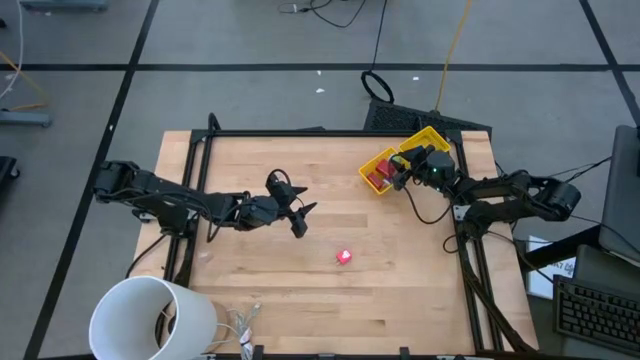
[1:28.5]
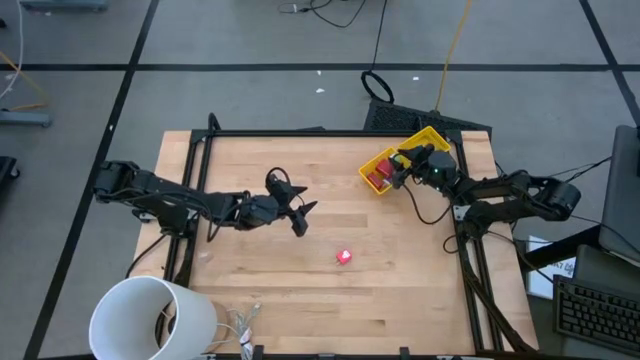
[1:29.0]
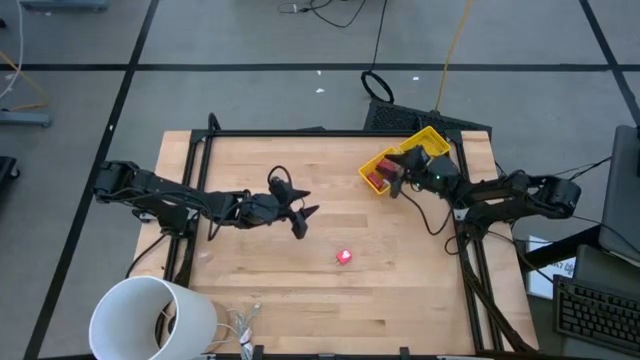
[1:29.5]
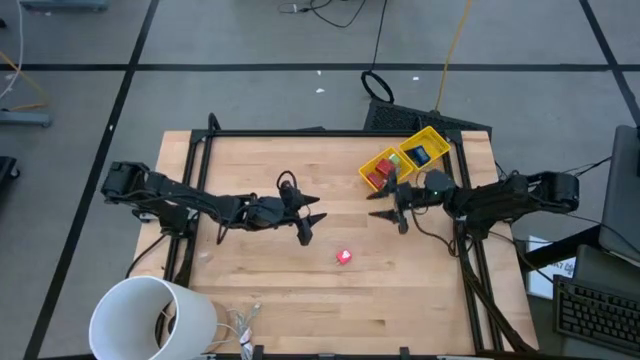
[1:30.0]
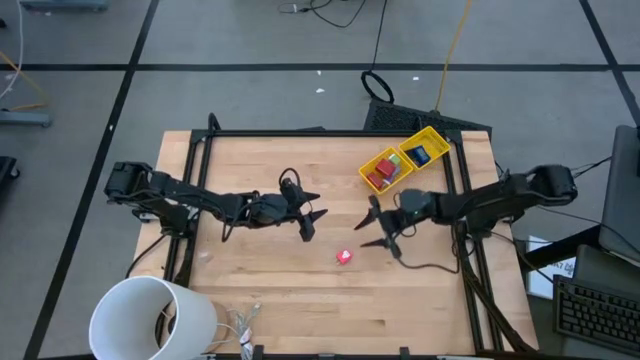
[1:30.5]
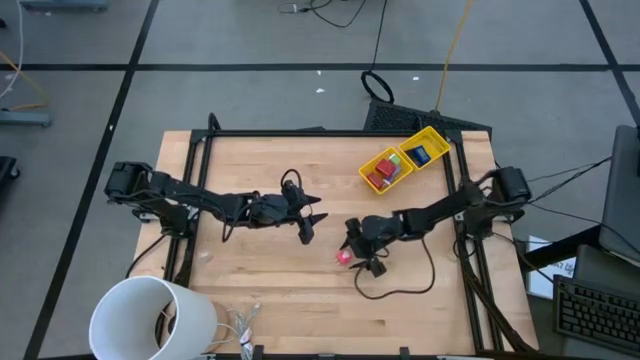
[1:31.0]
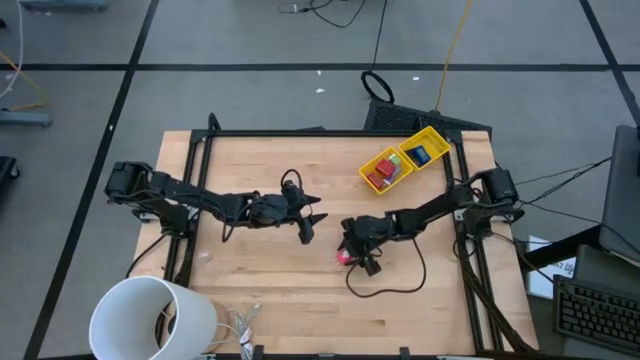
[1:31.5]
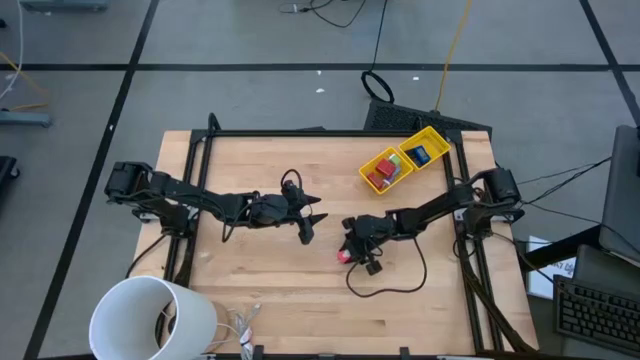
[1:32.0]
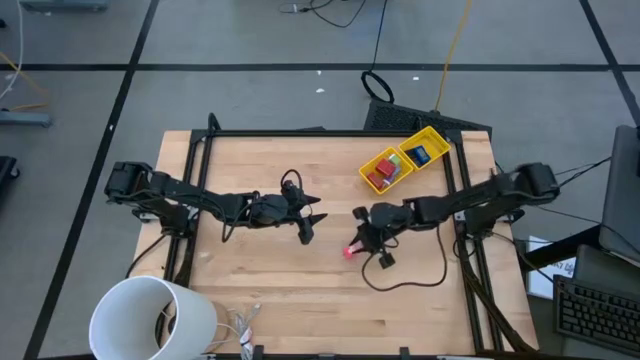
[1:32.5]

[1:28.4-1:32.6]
Task: Pick & Place Office items
Put the pink charger adapter into the left yellow bin

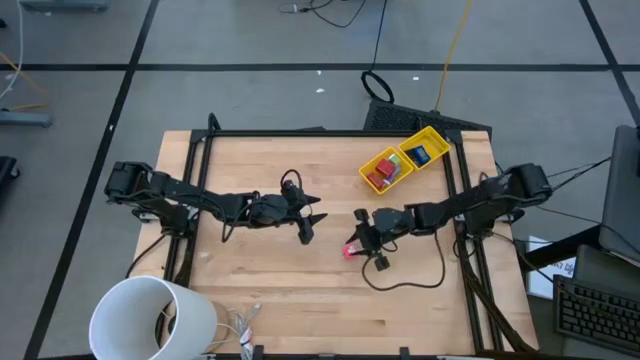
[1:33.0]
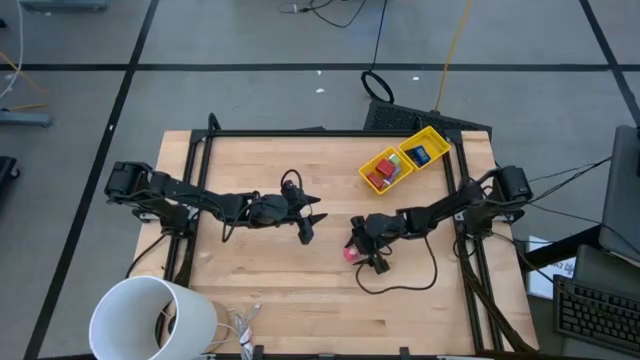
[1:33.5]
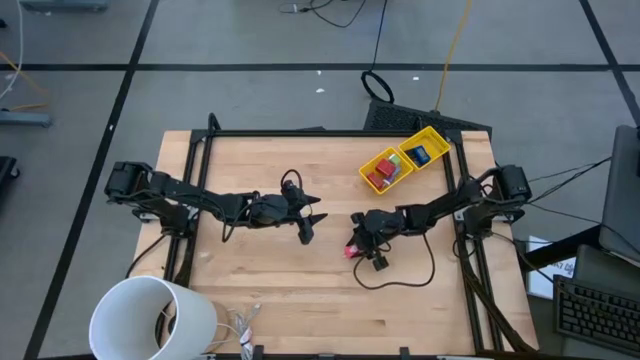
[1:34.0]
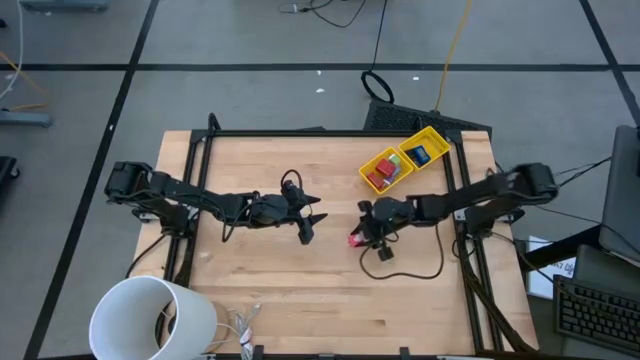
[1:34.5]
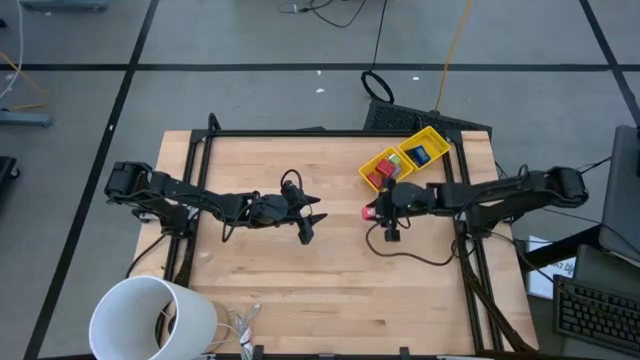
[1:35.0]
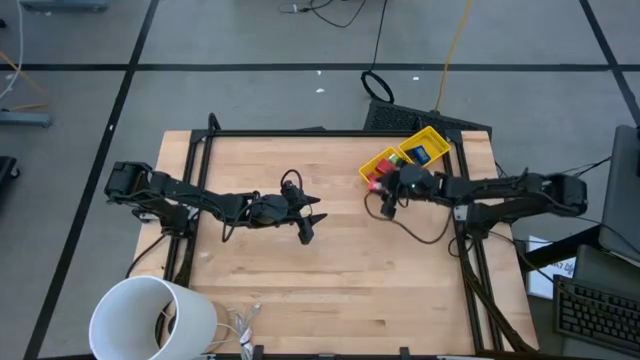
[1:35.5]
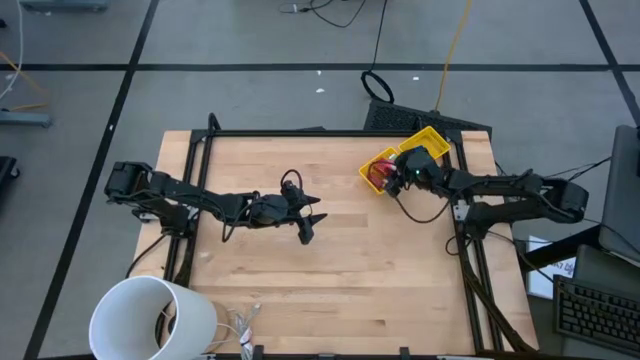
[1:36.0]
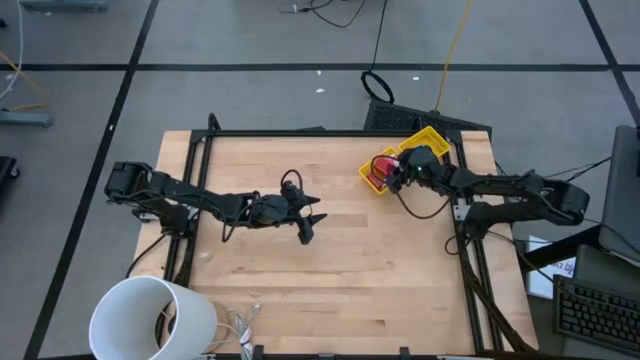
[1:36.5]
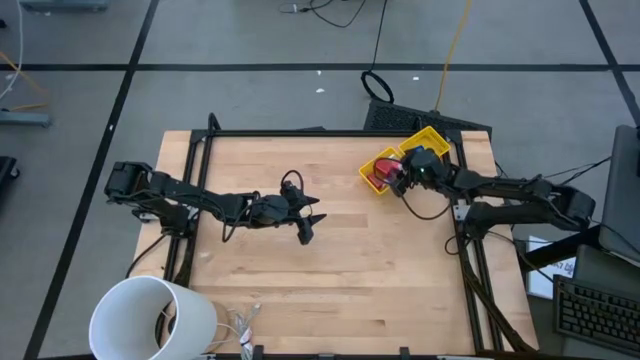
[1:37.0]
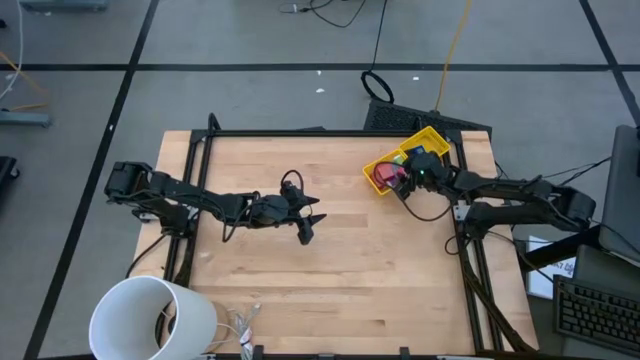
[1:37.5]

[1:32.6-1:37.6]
Put the pink charger adapter into the left yellow bin

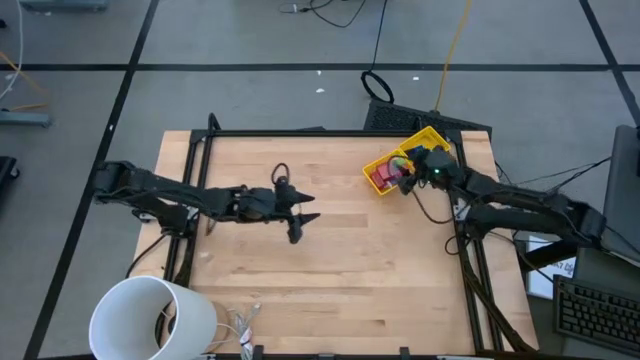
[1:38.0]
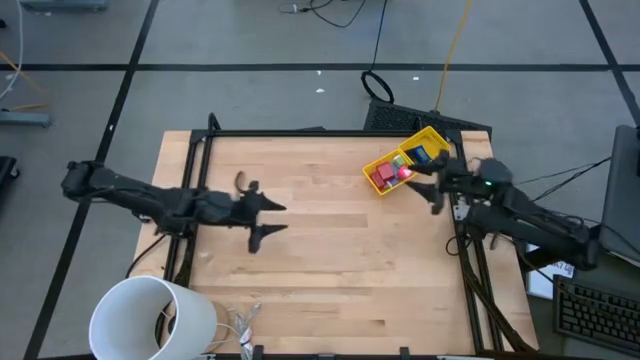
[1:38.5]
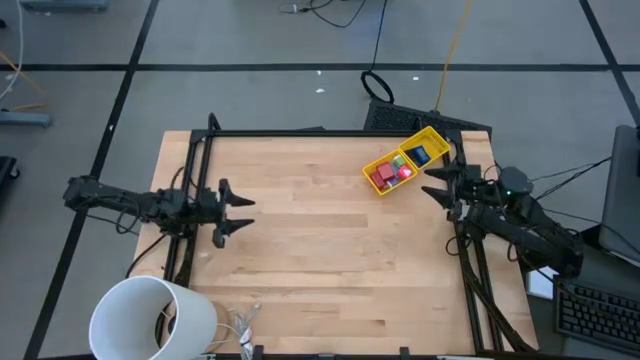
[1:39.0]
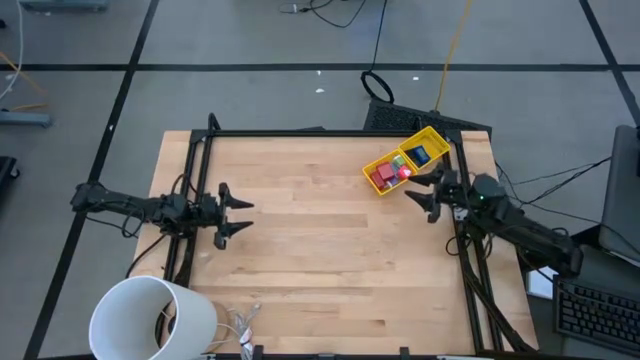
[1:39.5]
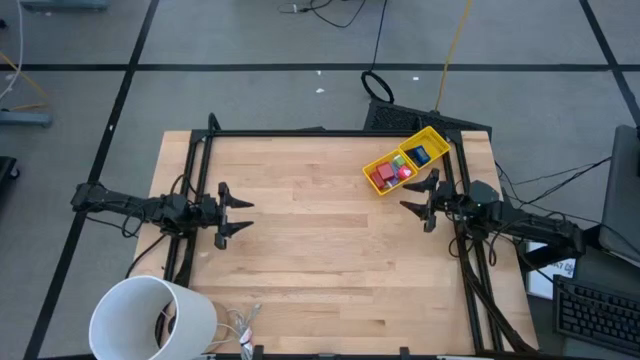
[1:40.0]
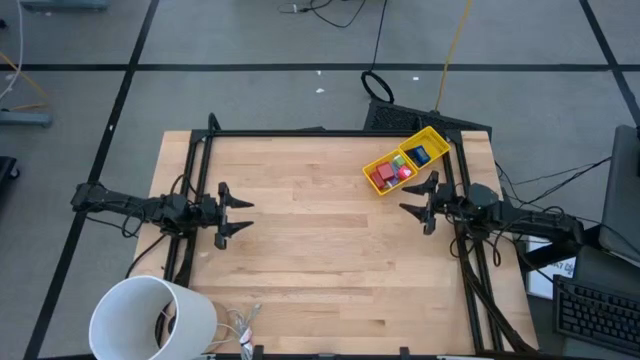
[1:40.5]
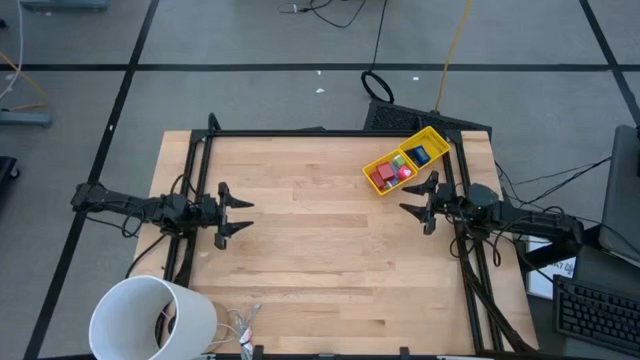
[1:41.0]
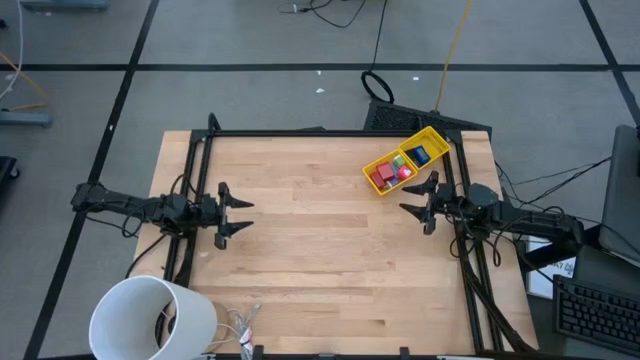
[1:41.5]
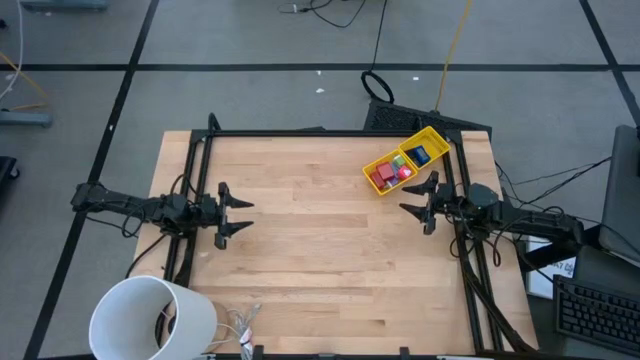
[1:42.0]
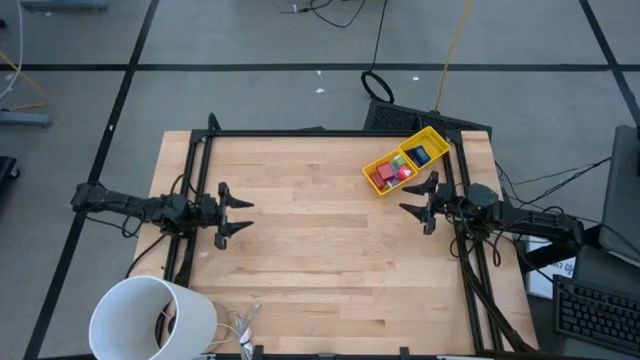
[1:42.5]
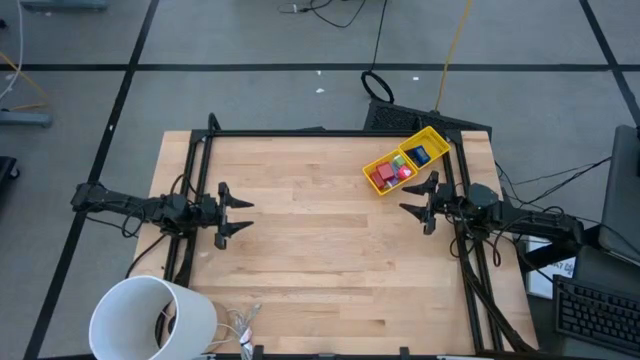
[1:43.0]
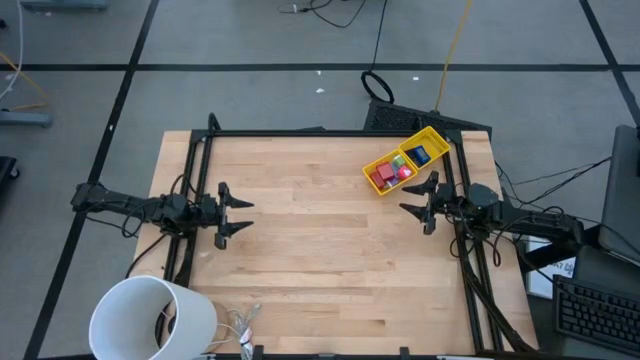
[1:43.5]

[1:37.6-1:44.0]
Return to Home Position

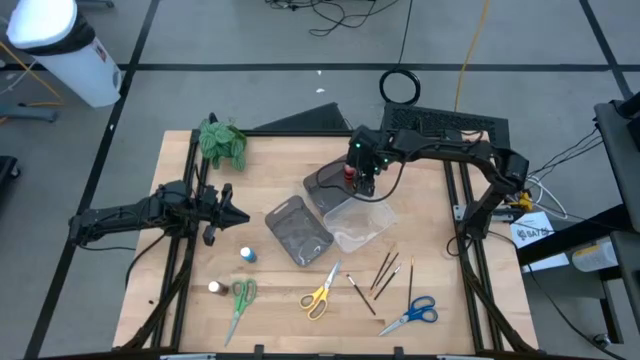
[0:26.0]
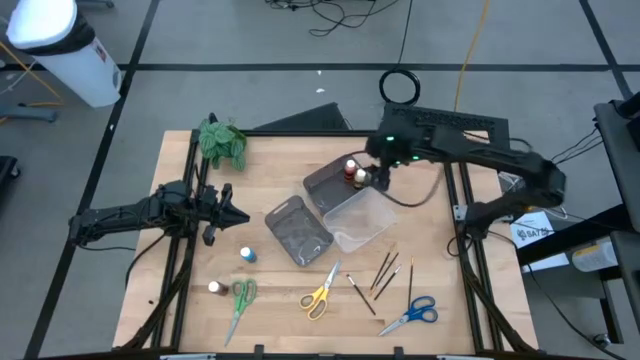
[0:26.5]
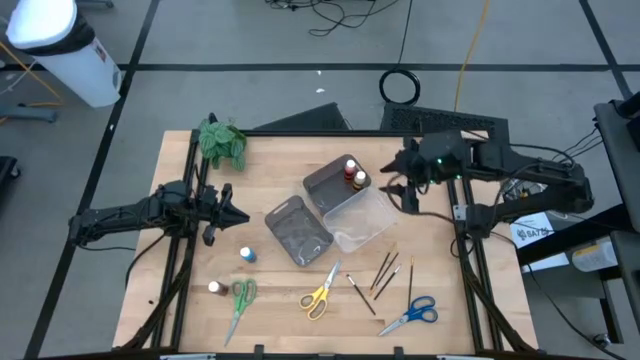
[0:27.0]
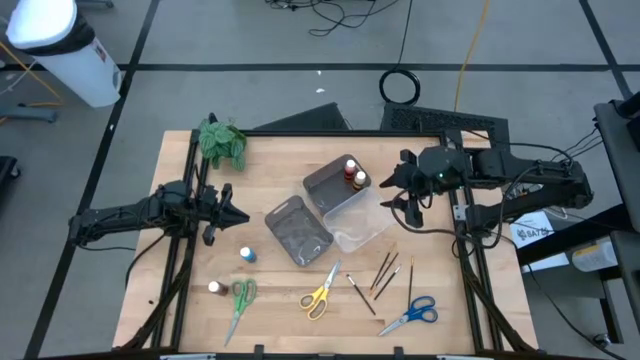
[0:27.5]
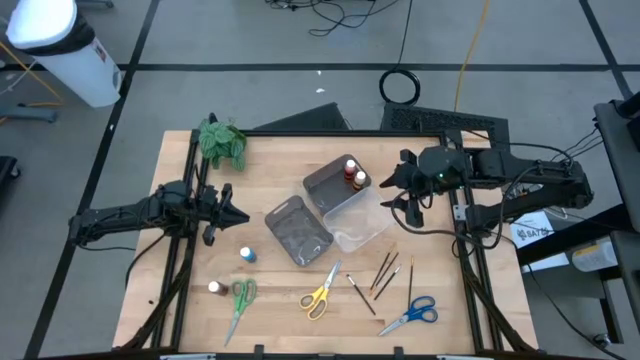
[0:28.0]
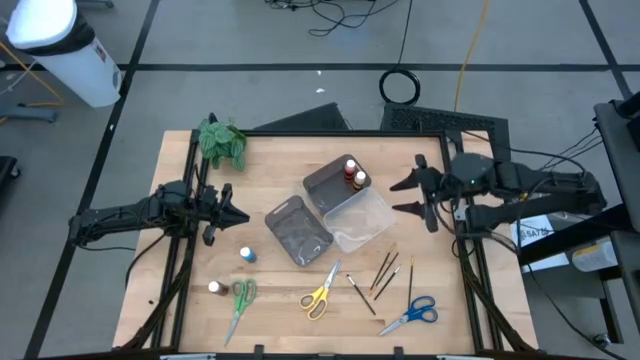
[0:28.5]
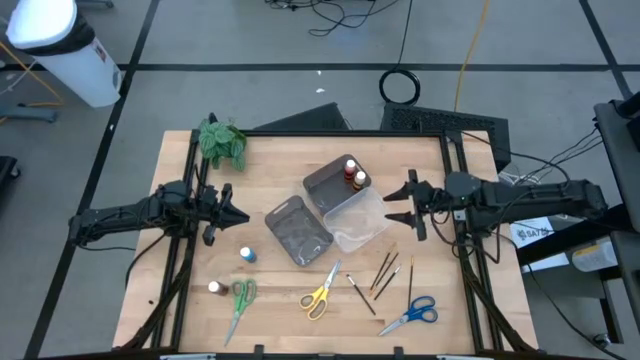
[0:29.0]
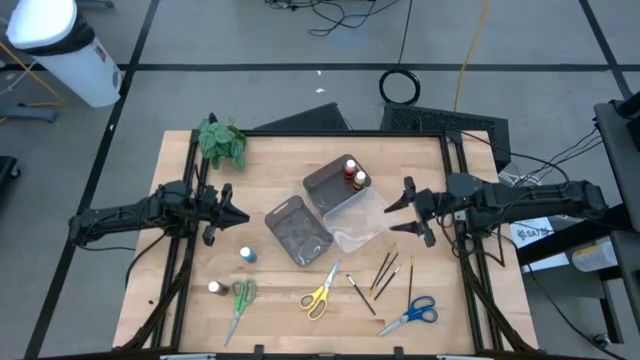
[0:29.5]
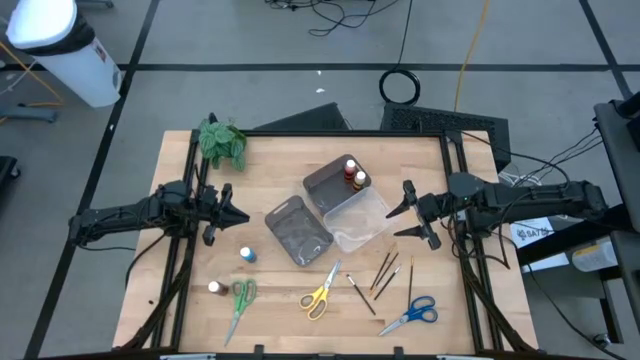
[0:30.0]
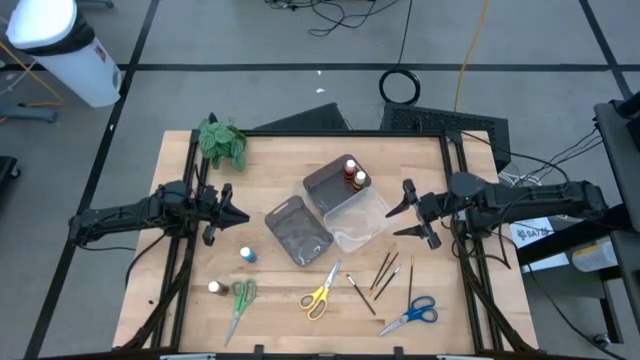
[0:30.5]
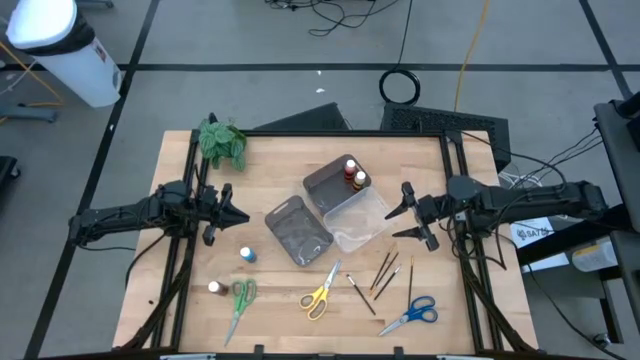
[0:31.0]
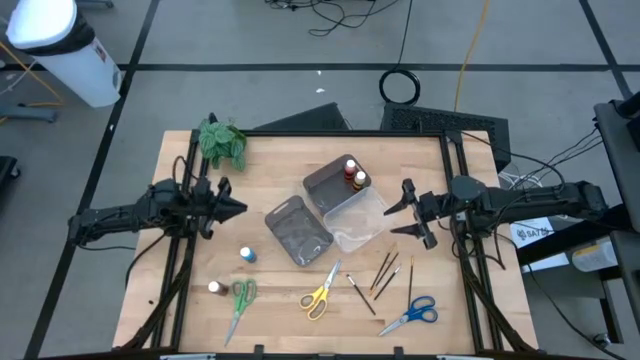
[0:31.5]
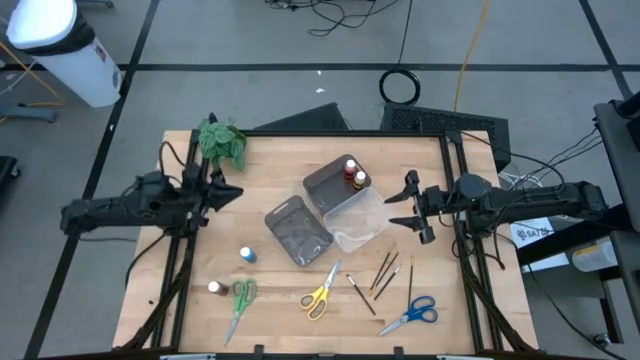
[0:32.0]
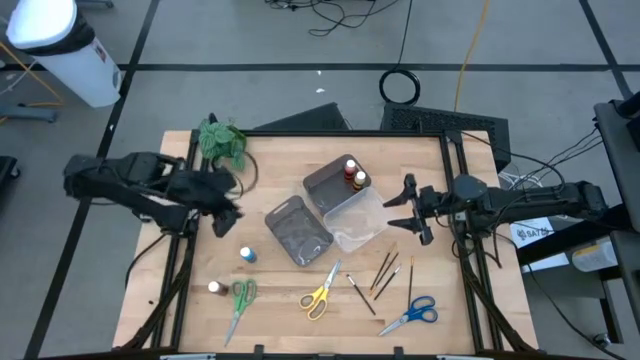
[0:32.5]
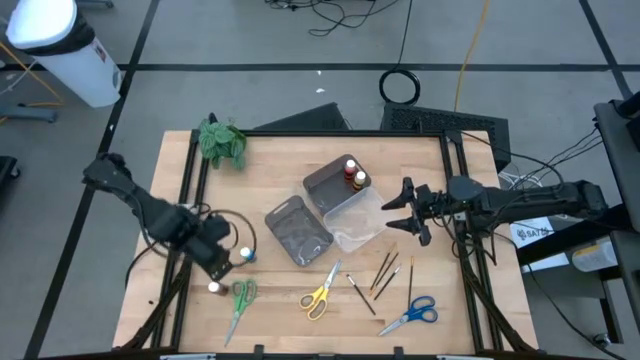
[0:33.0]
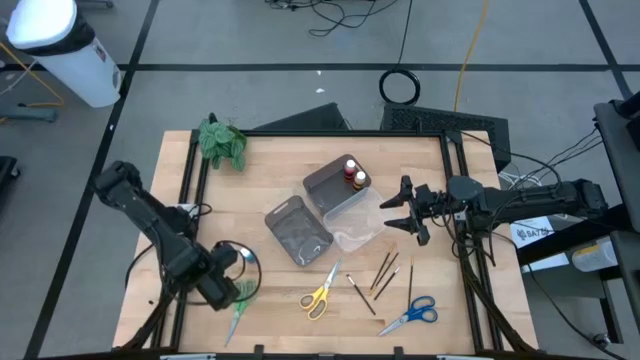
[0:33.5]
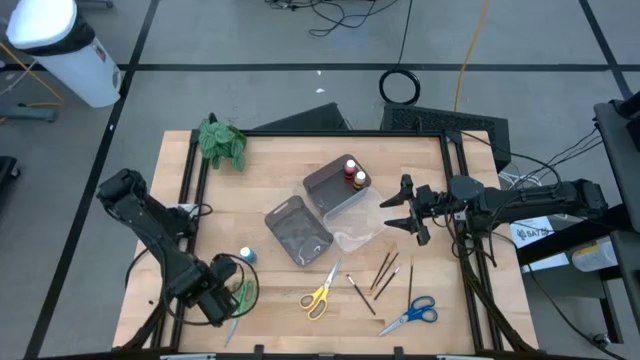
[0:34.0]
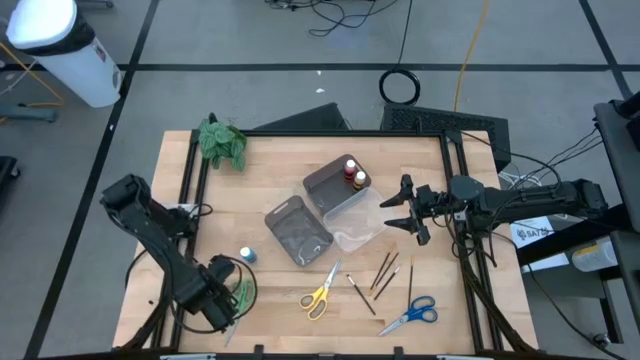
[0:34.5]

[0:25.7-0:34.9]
Task: Pick & Place Paint Supplies
Put the brown paint bottle into the top black bin
